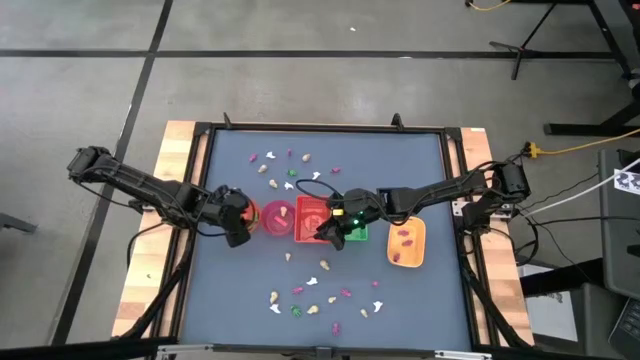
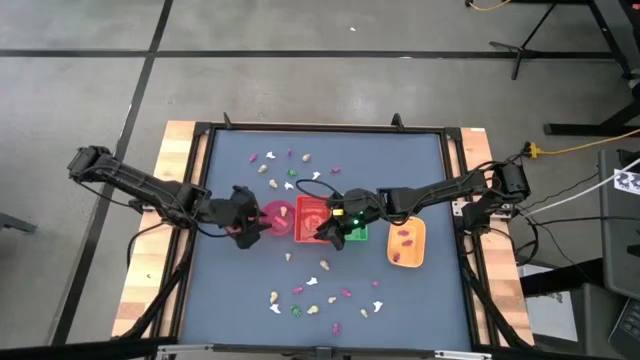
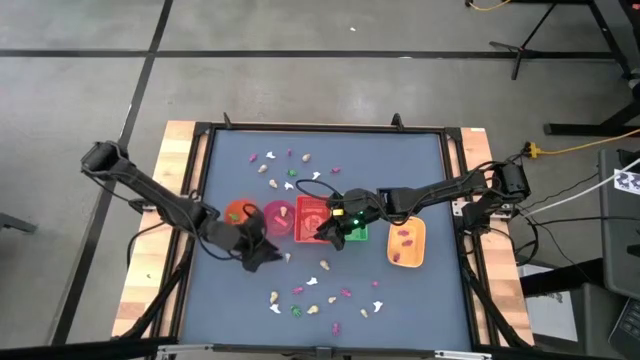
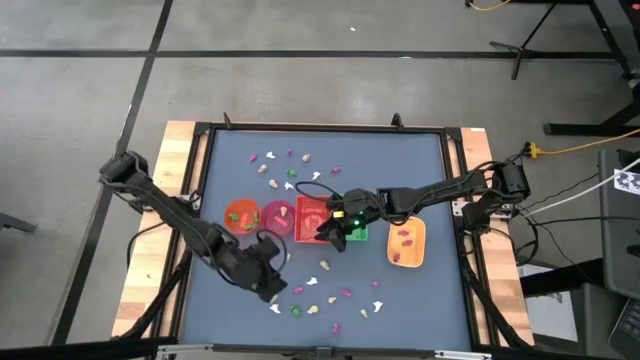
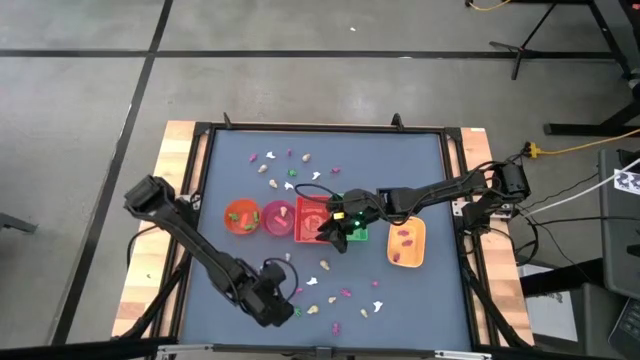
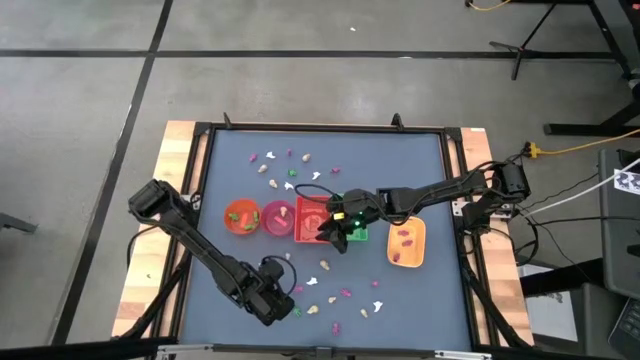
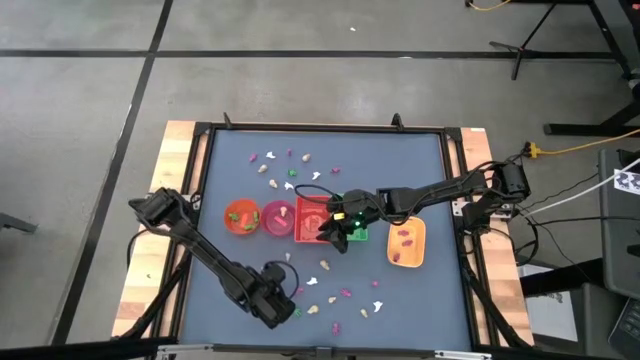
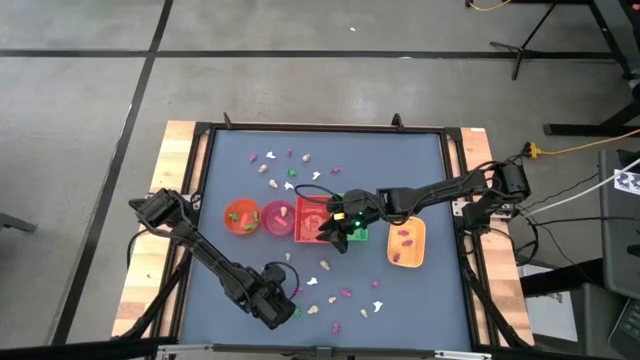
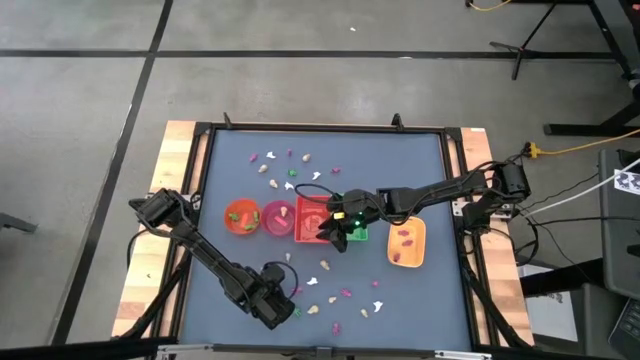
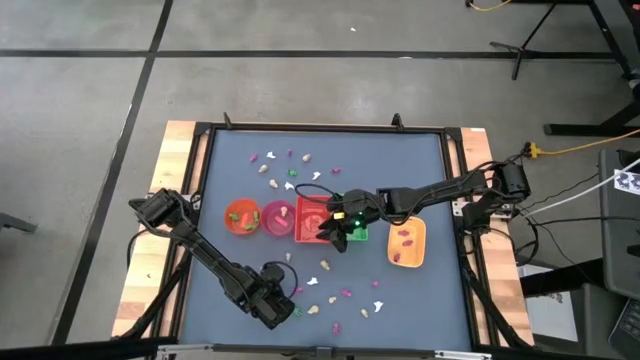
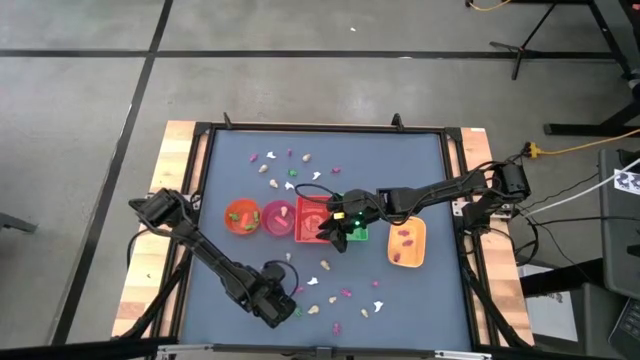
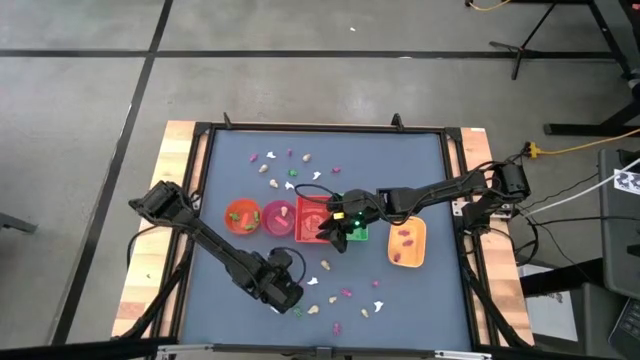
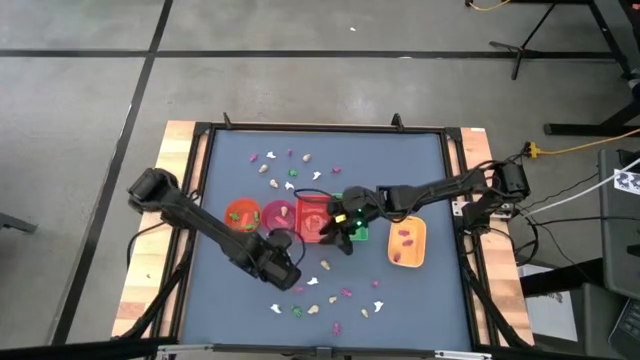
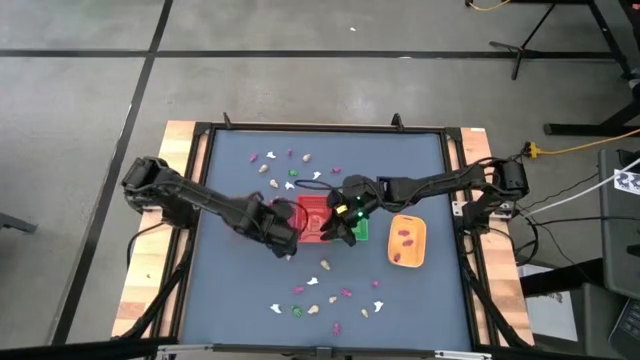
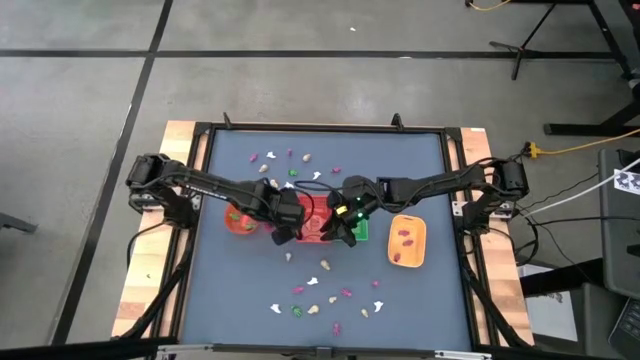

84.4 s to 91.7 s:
Task: Sort Halloween decoration
Put the yellow skeleton toy into the pink bin

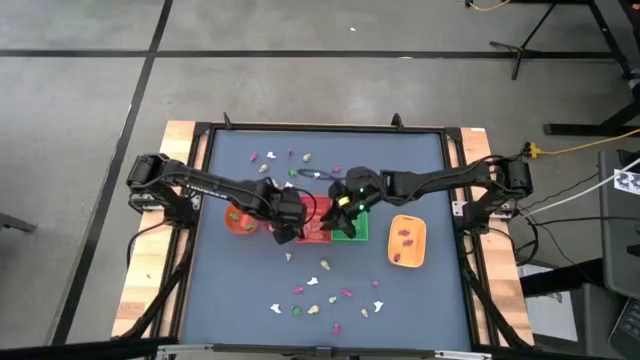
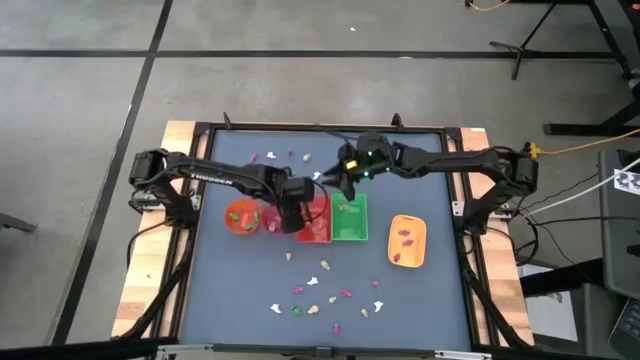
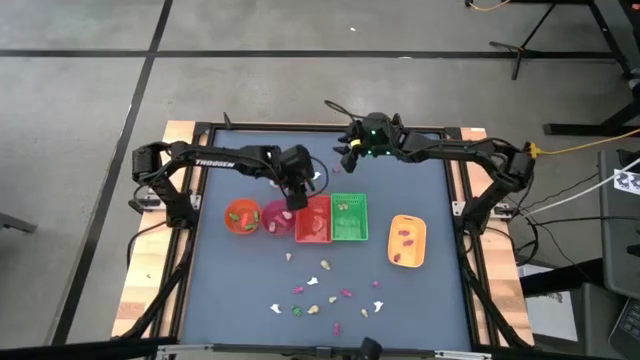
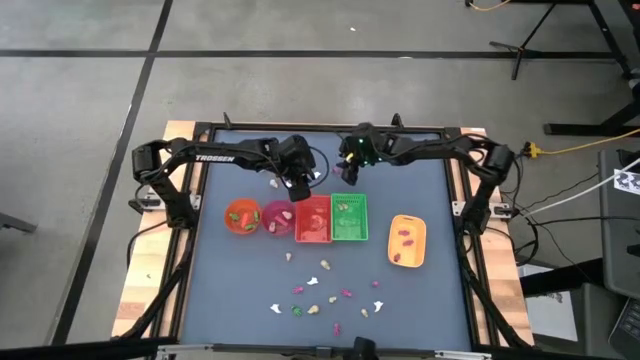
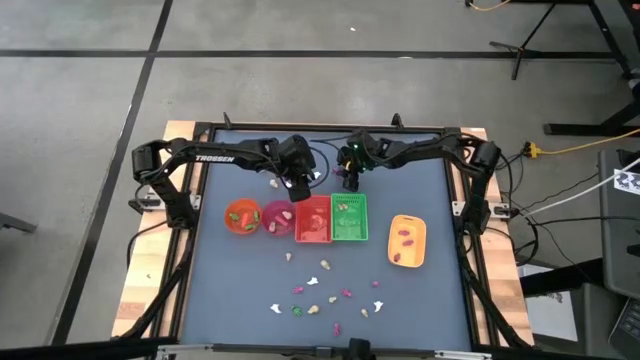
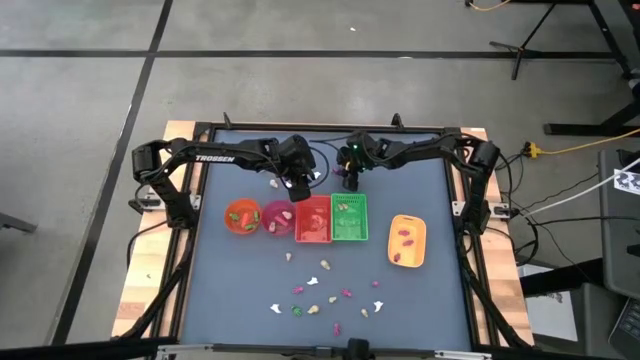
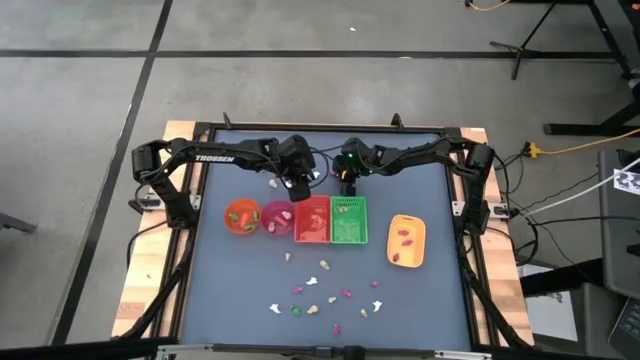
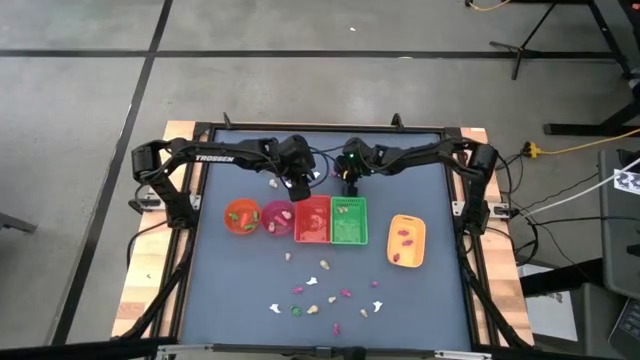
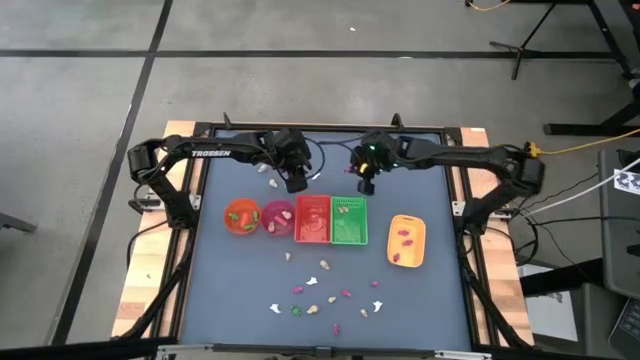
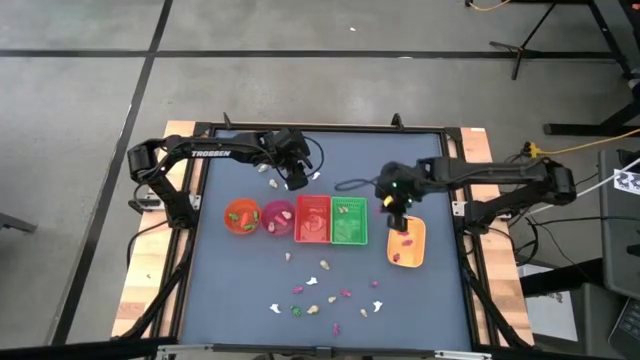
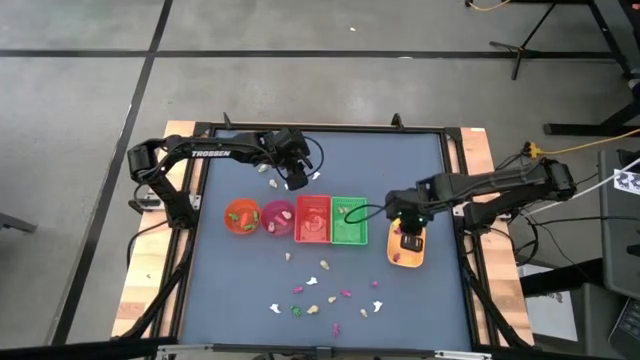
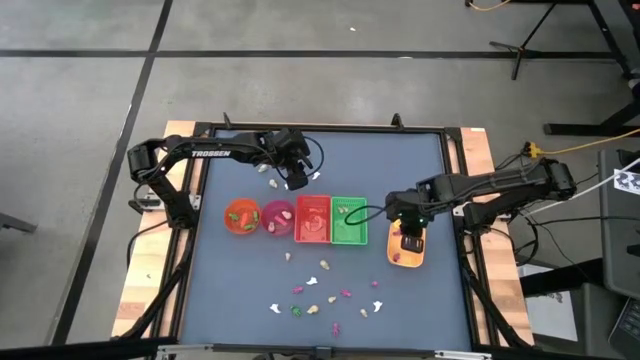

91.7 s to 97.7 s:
Put the pink skeleton toy into the yellow bin

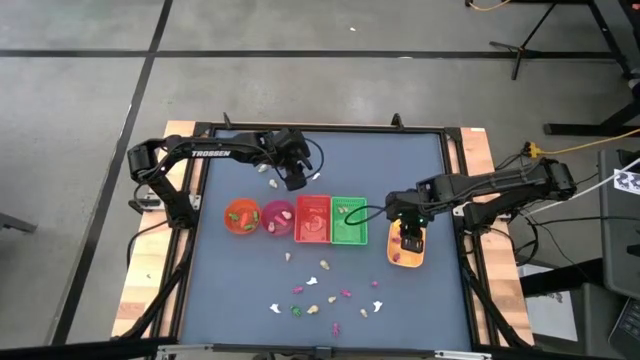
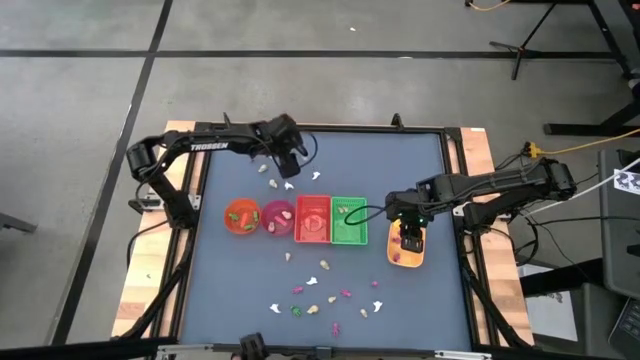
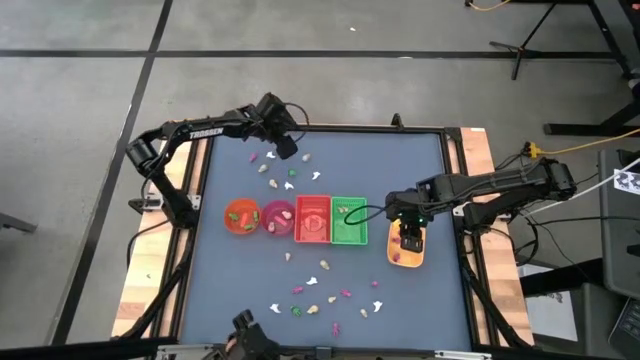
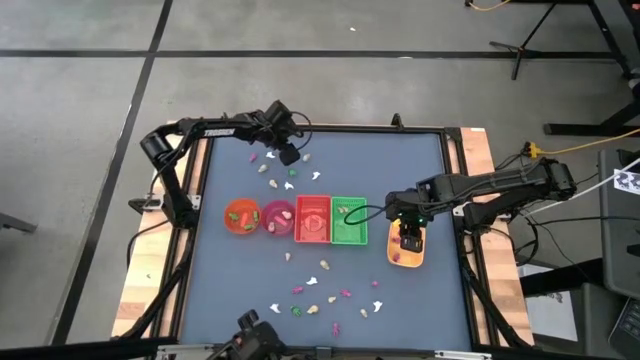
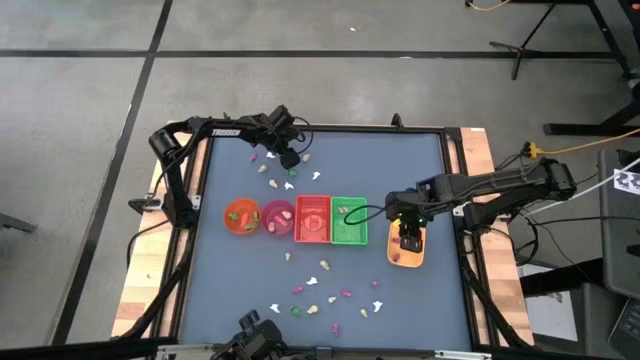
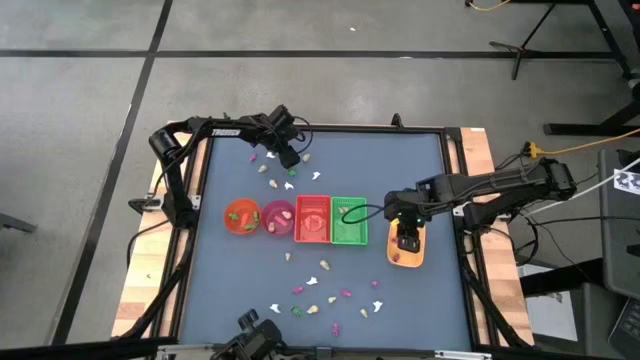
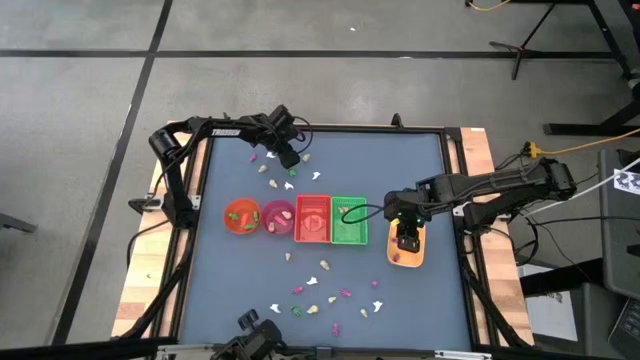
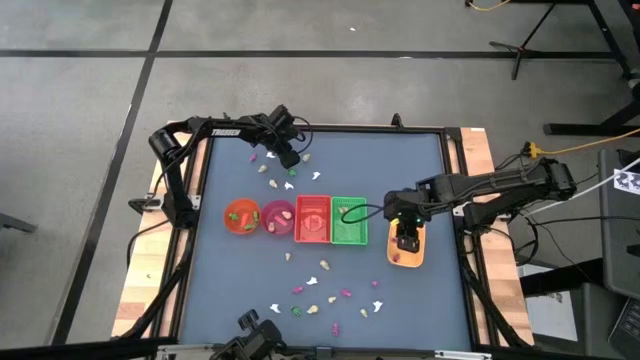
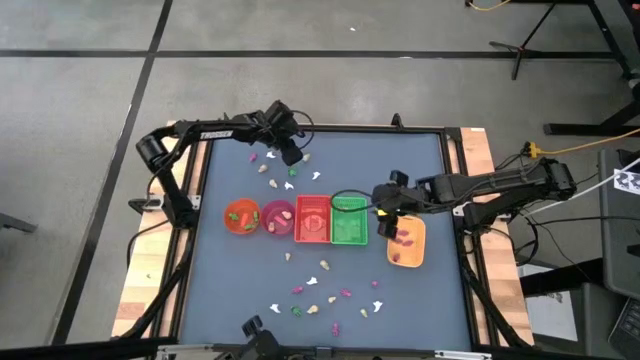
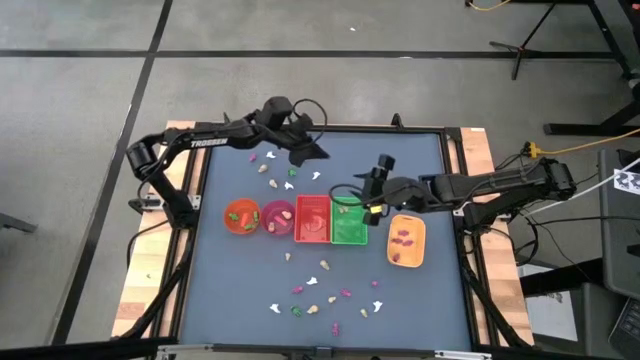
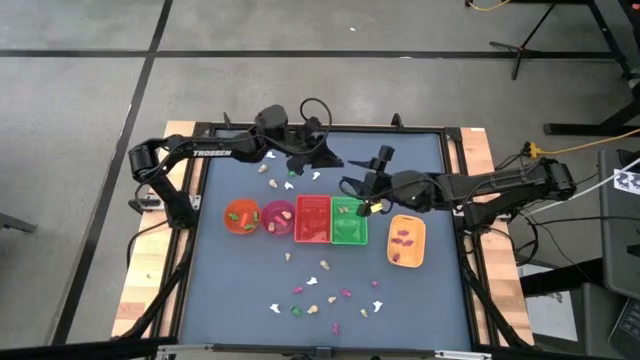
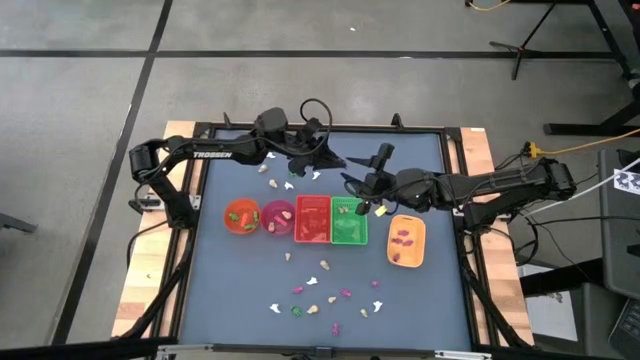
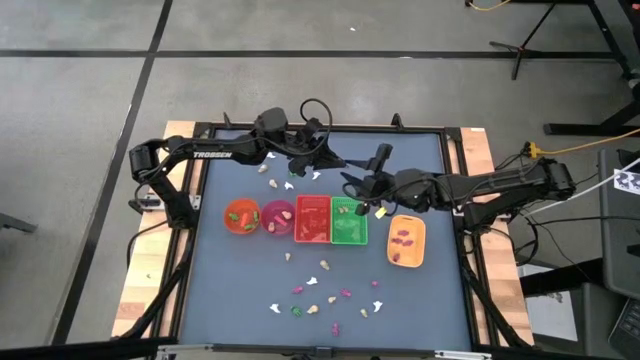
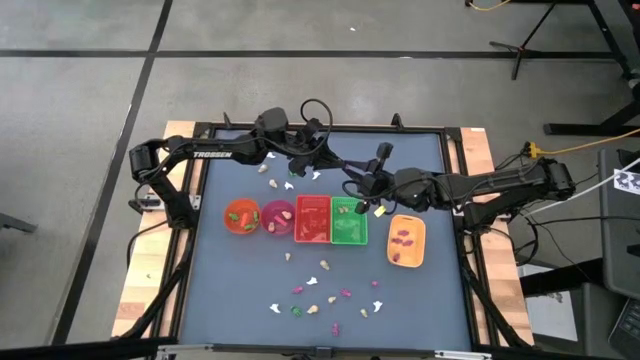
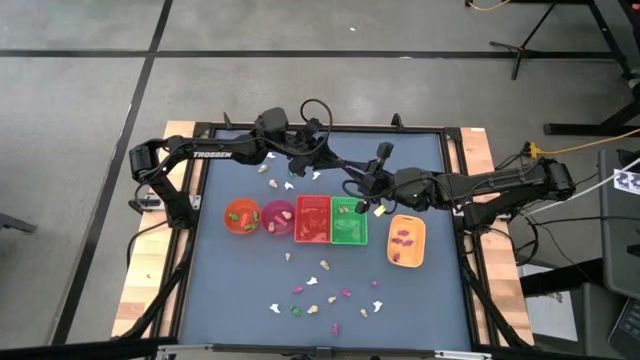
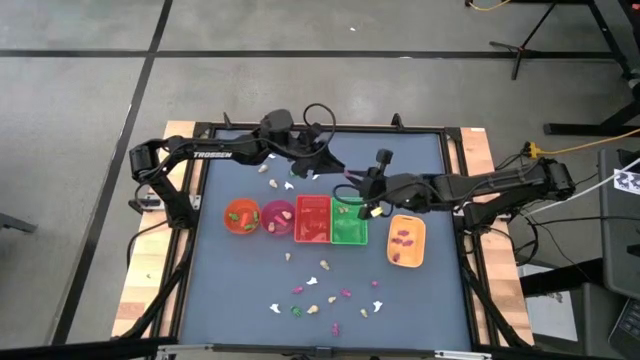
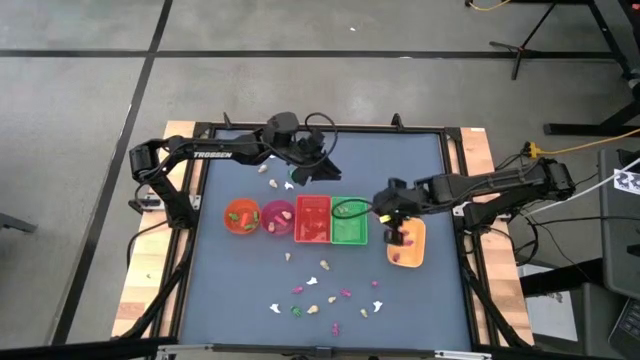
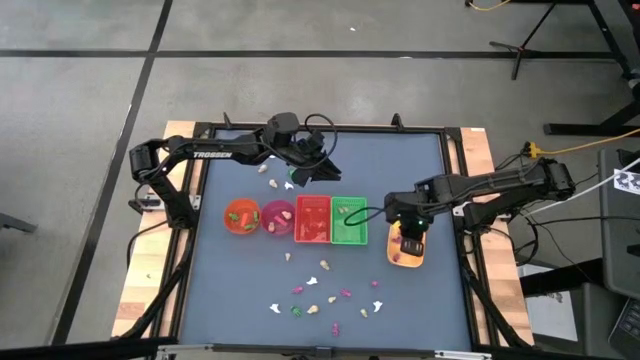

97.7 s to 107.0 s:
Put the pink skeleton toy into the yellow bin
